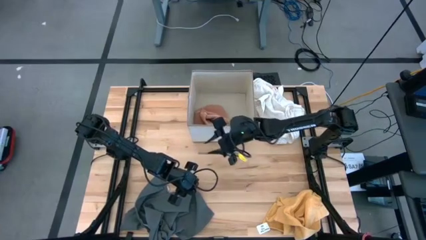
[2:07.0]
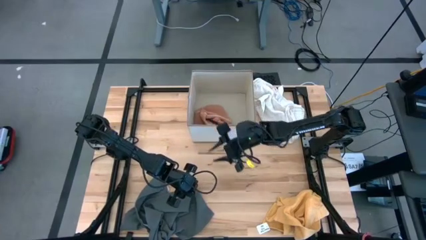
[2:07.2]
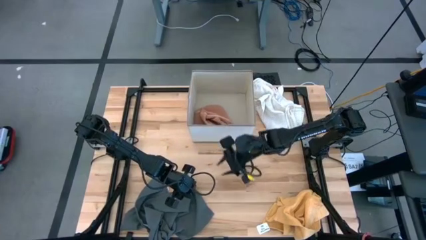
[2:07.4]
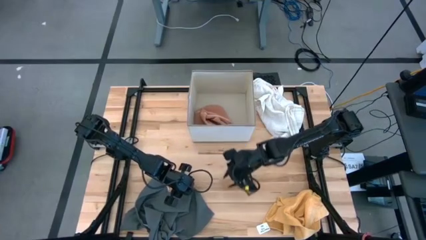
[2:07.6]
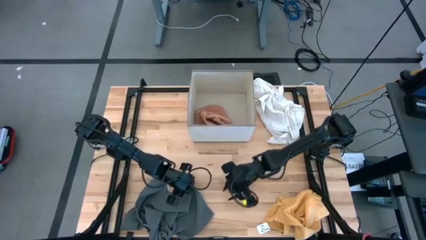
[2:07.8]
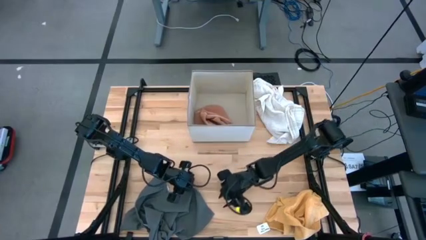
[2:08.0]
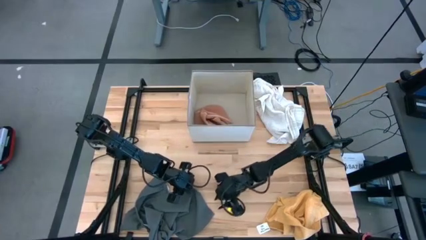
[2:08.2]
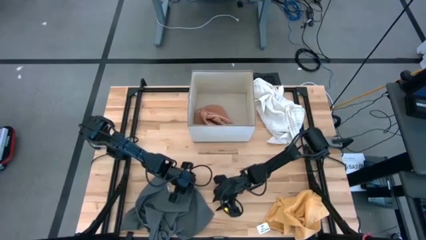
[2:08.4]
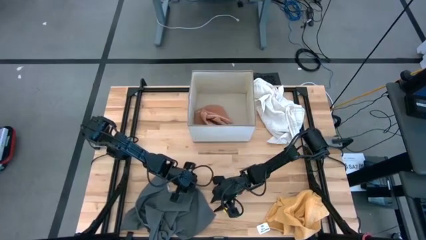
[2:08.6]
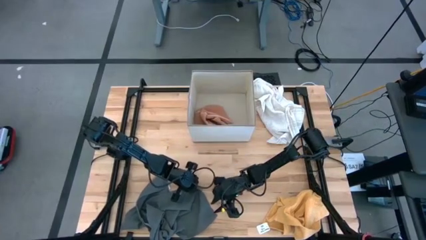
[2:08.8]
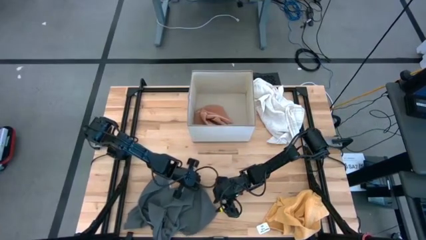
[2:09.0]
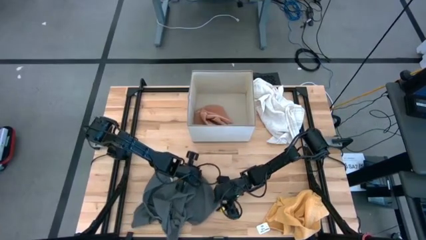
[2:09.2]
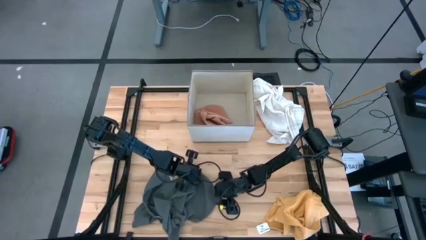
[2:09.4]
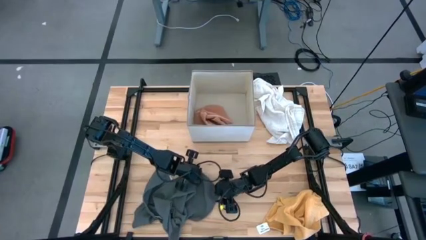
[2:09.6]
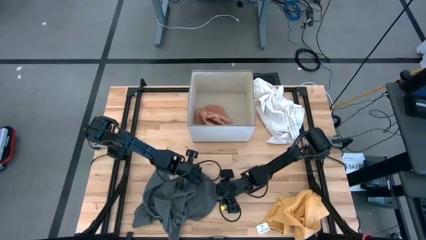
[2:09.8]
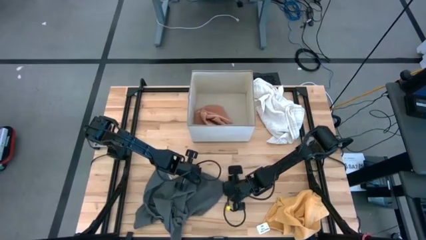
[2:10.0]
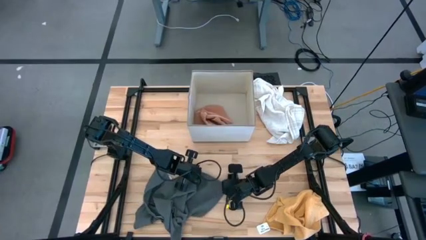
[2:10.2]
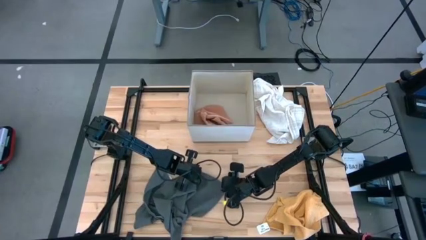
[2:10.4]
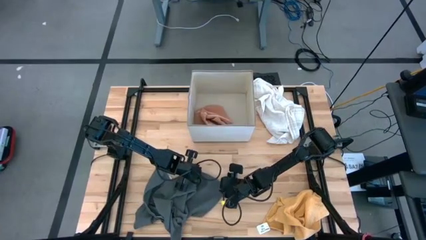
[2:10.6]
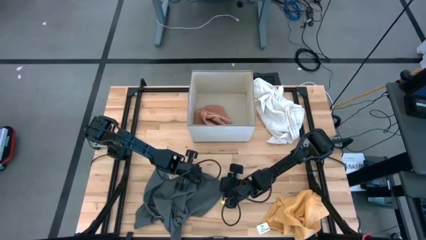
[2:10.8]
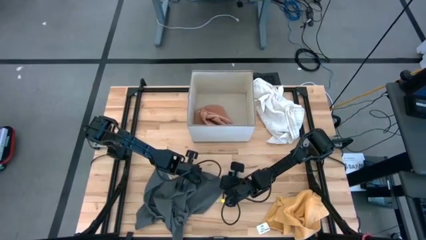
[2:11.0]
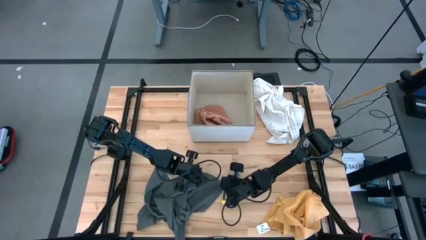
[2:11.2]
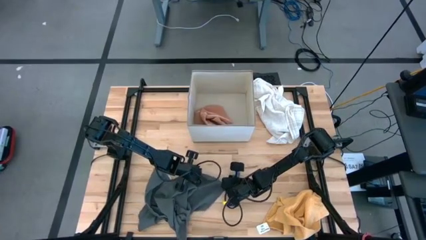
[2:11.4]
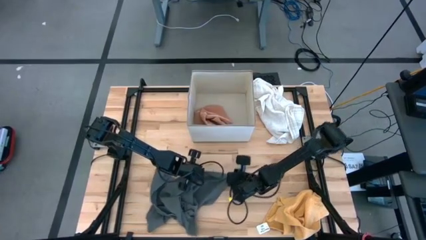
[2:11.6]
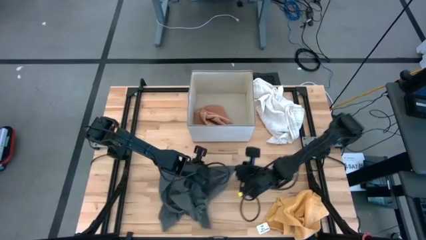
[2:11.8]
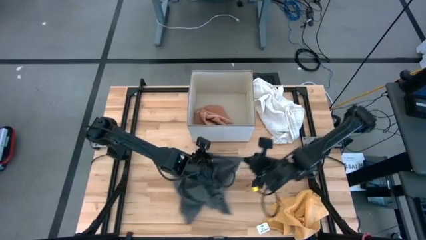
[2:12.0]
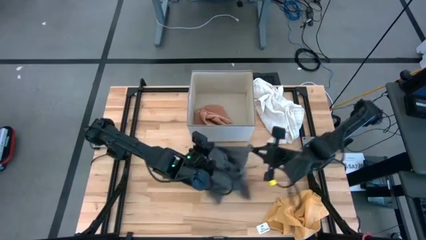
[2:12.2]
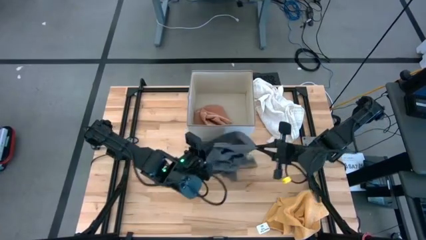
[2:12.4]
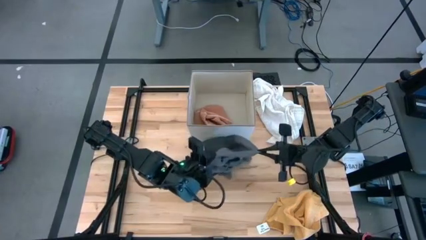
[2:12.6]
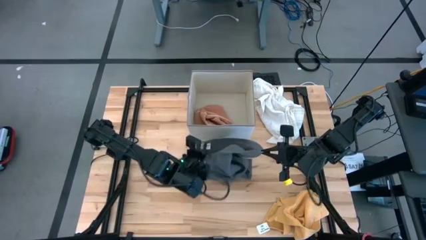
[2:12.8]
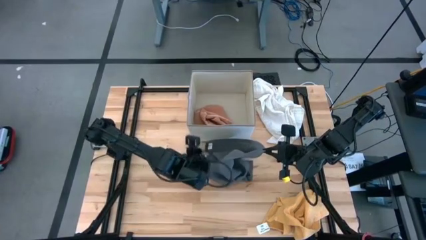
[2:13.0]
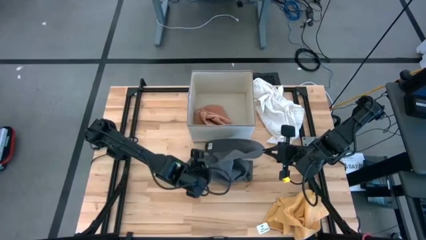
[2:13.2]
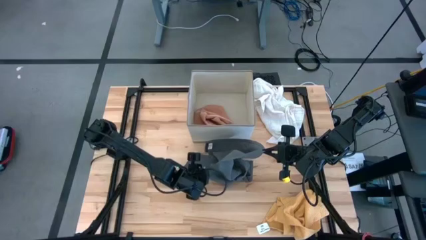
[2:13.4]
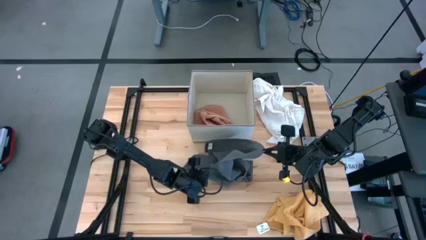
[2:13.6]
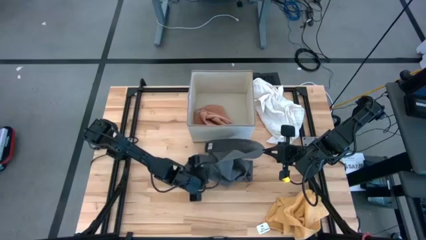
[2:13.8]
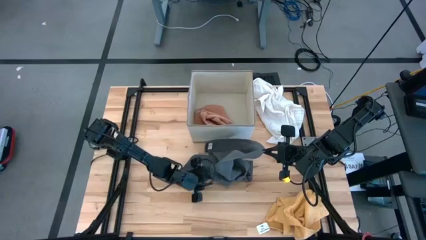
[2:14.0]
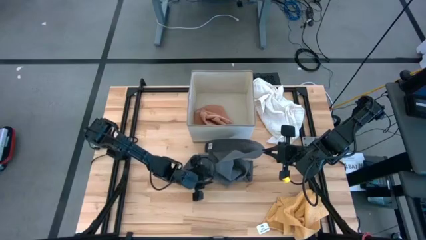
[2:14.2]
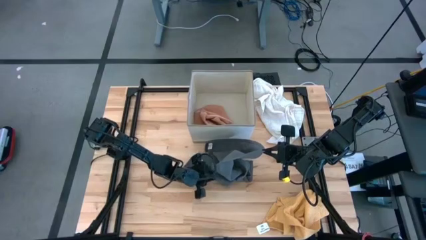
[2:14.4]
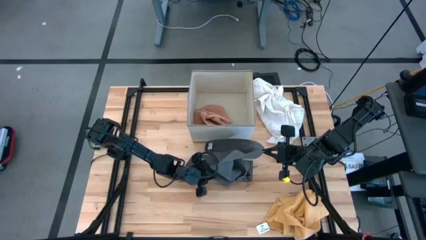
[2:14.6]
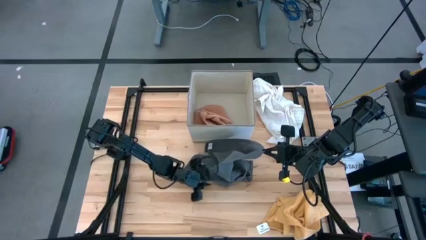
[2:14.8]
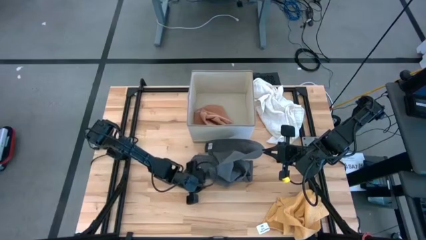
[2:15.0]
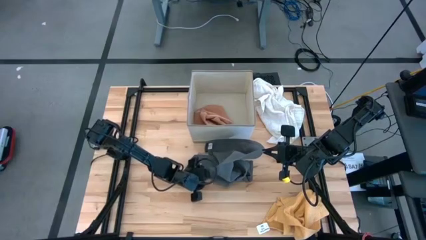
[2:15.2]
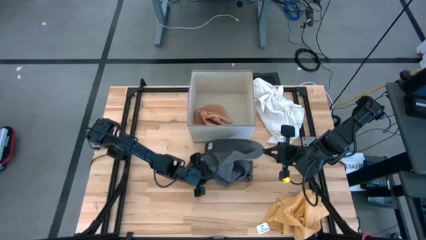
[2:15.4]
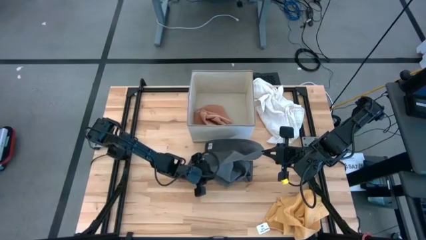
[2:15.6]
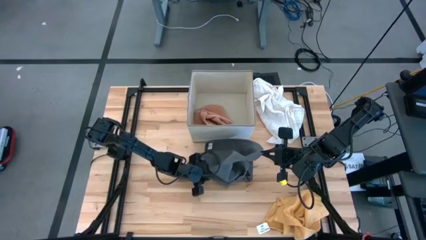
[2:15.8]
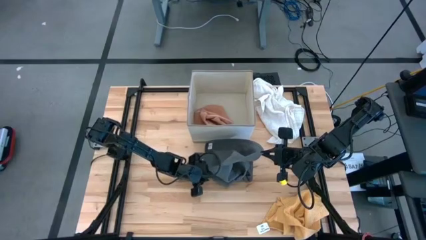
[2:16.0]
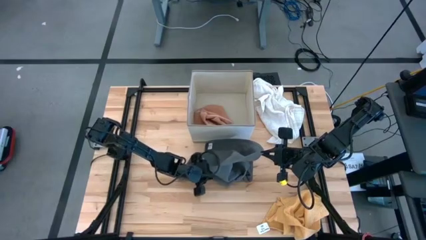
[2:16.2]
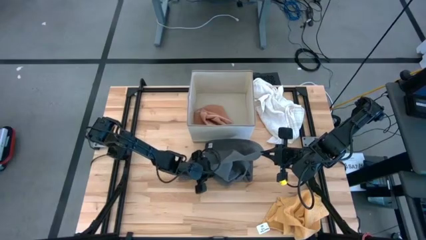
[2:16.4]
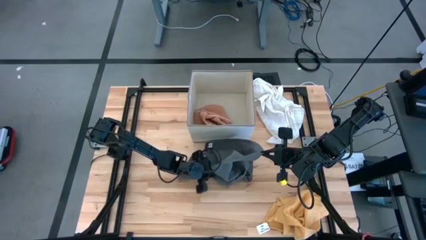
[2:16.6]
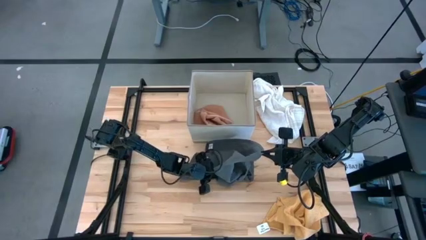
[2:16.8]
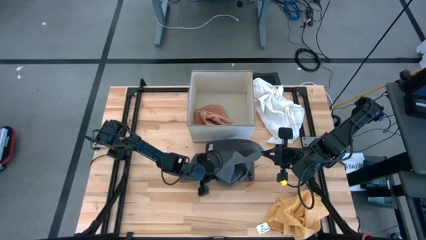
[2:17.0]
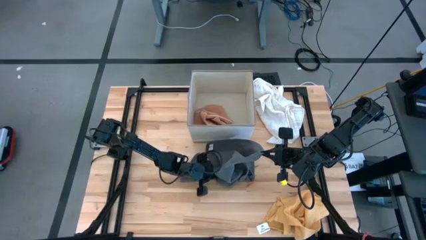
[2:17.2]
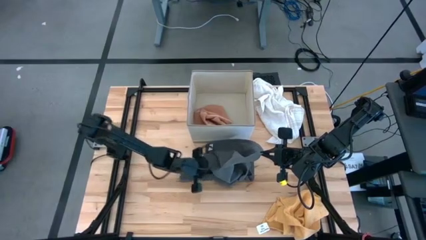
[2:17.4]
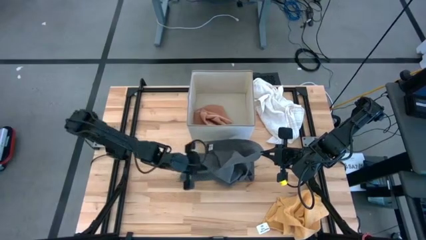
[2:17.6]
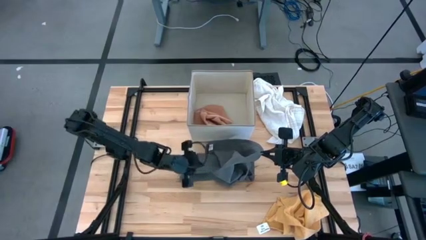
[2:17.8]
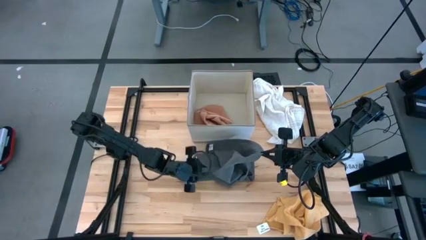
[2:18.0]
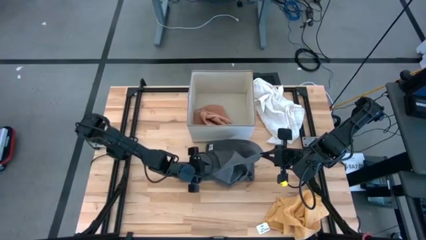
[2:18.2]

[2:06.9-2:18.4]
Task: Fold towel
Fold the gray towel
